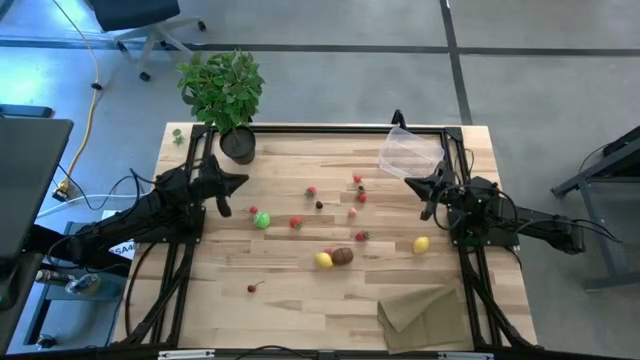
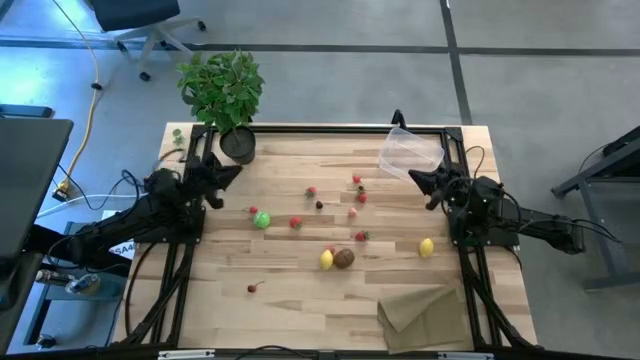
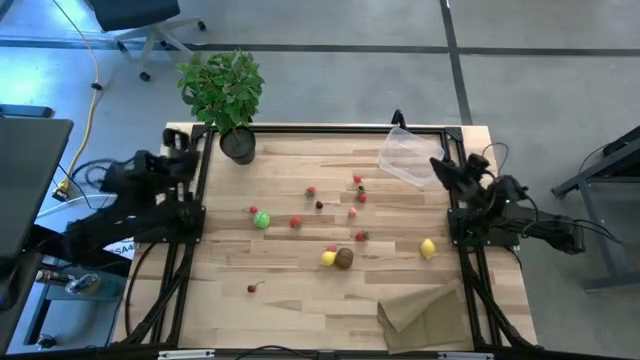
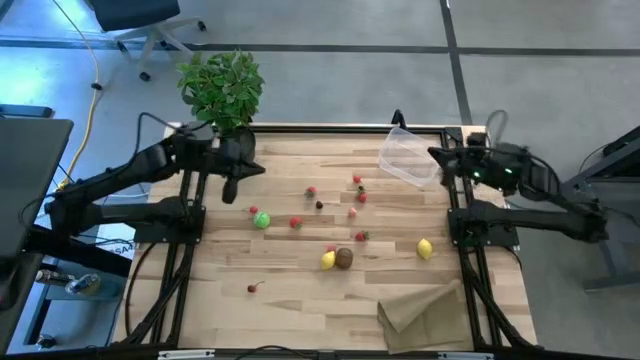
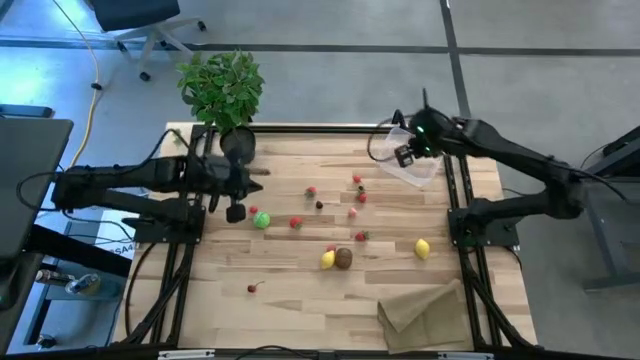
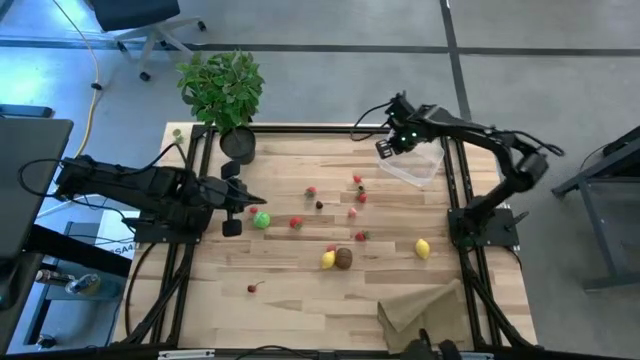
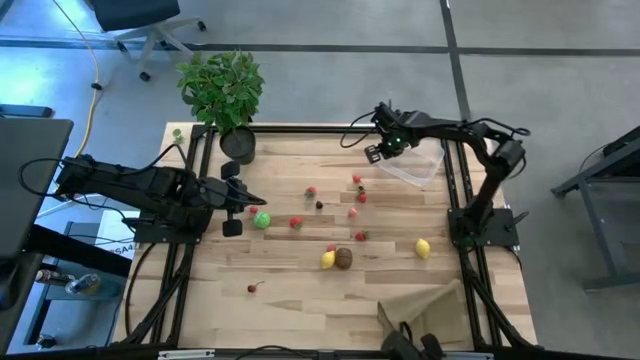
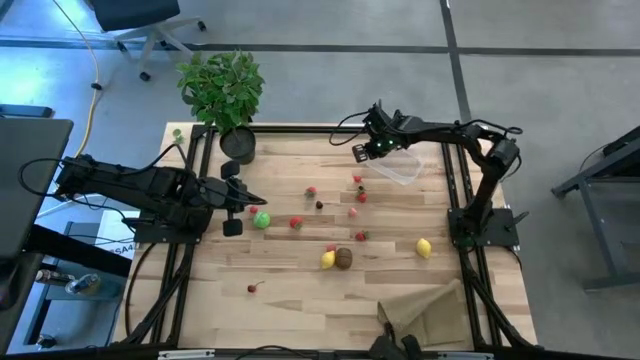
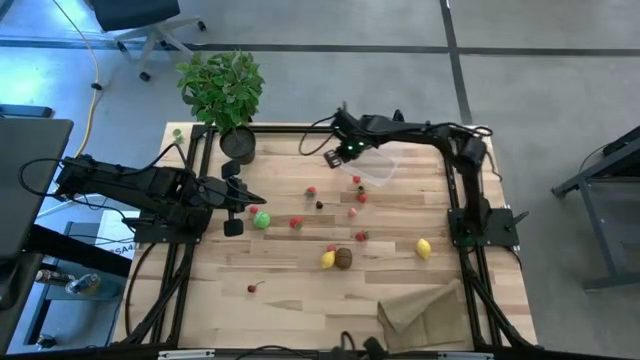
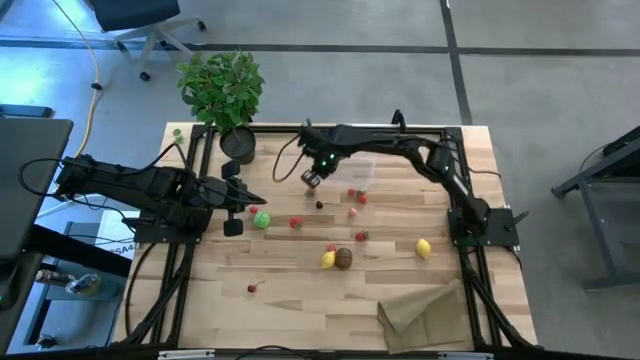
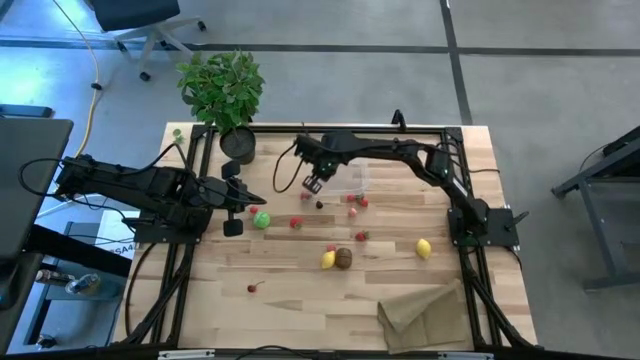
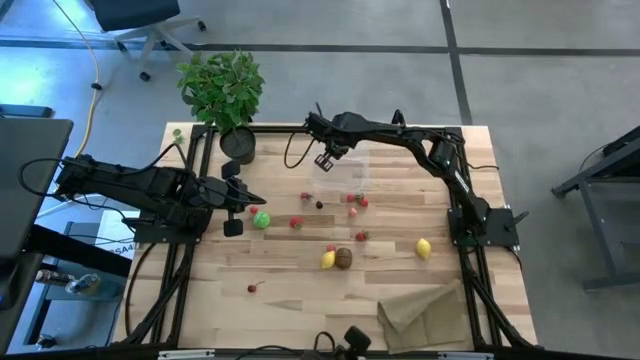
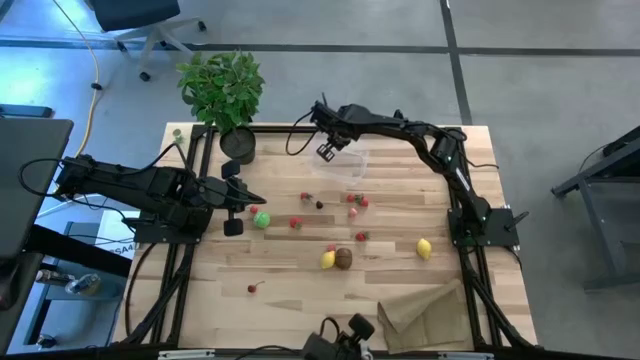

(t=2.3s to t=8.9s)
Task: Pick and placing Produce into tupperware
Move the transparent bin

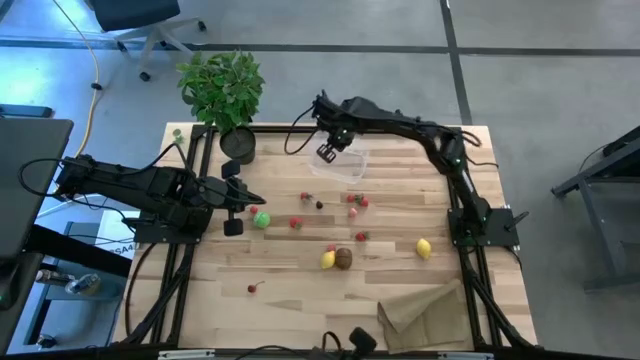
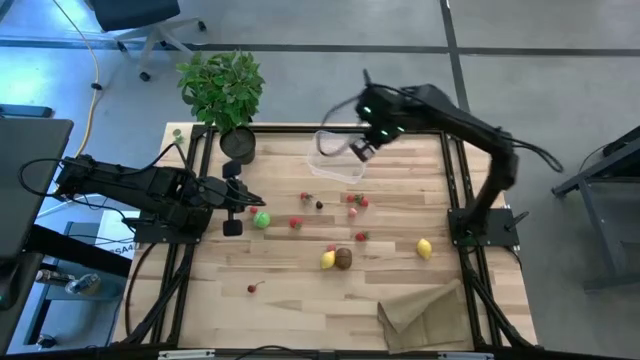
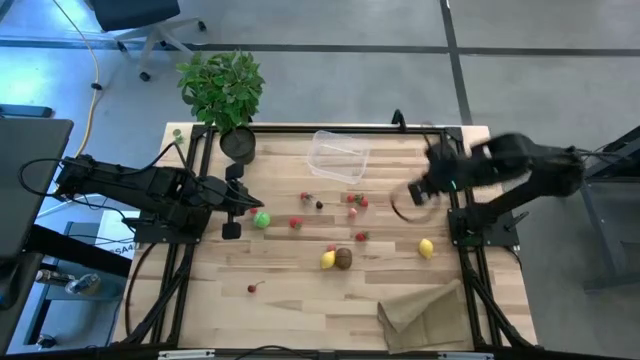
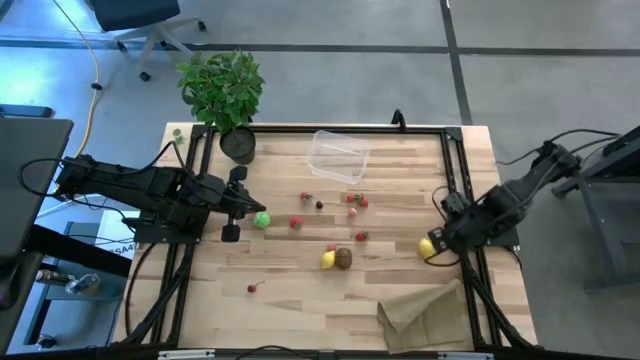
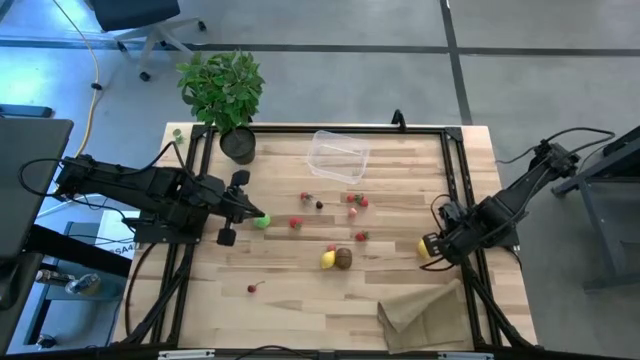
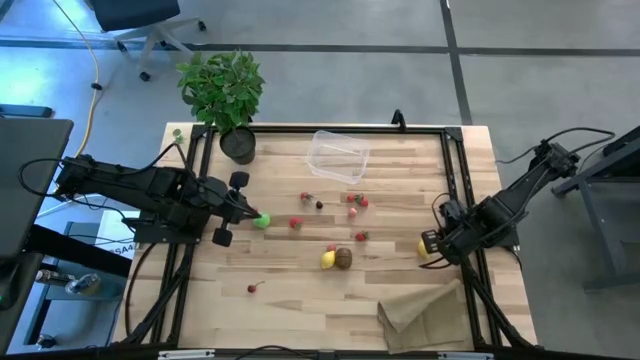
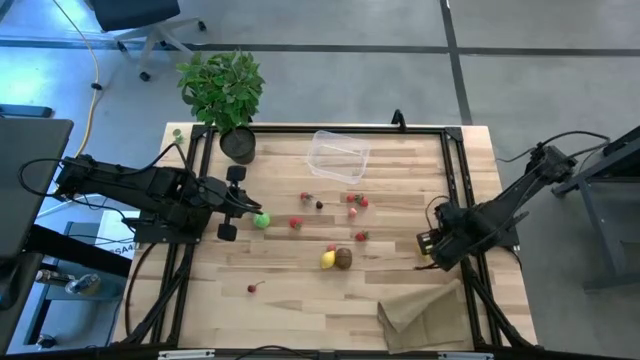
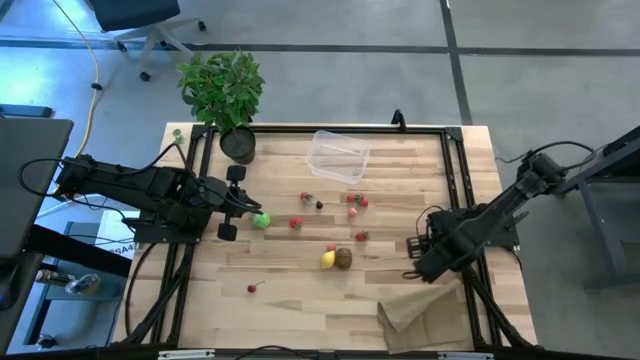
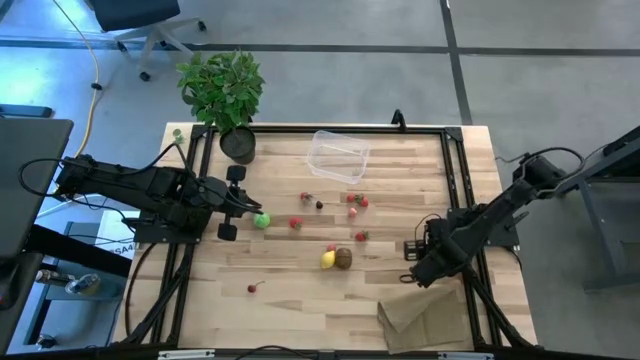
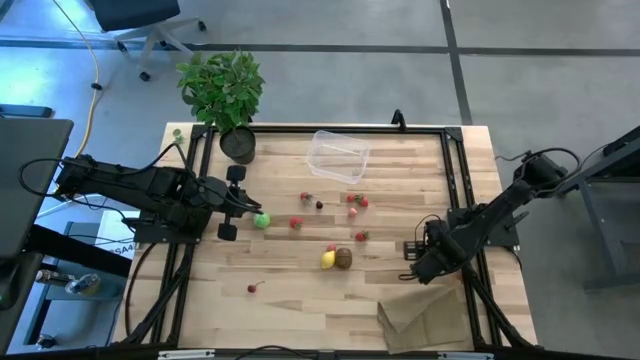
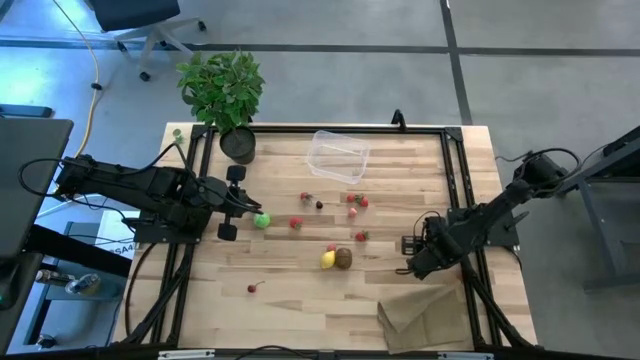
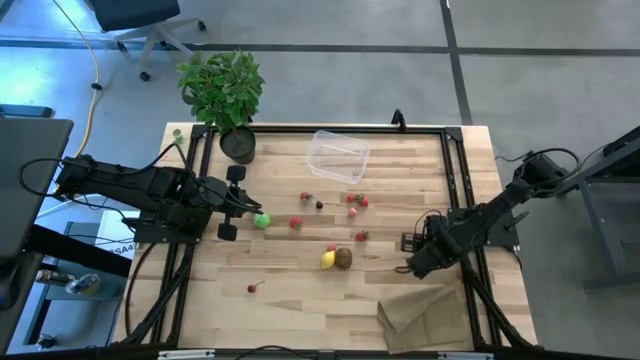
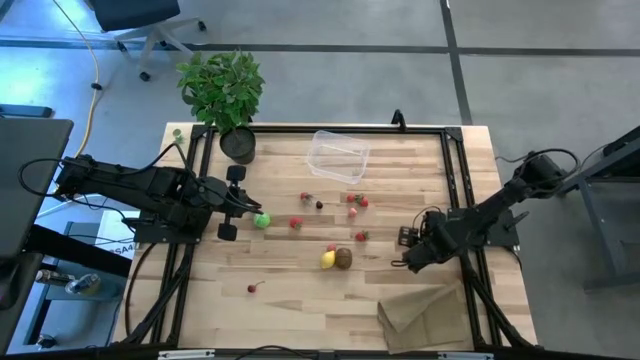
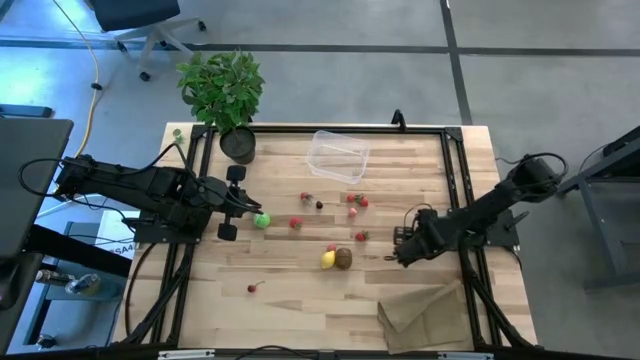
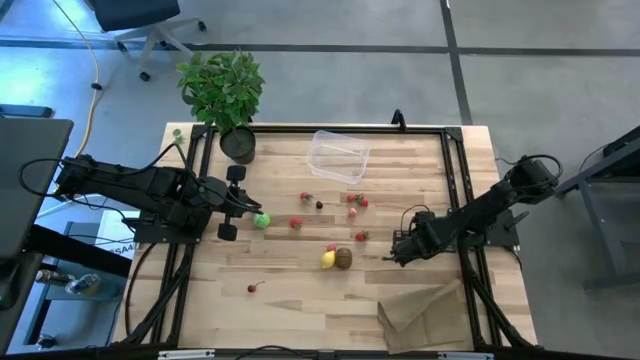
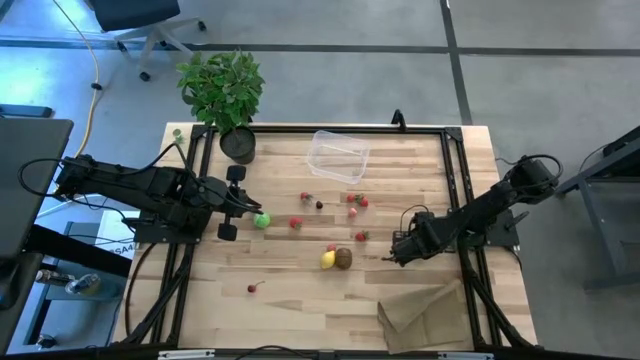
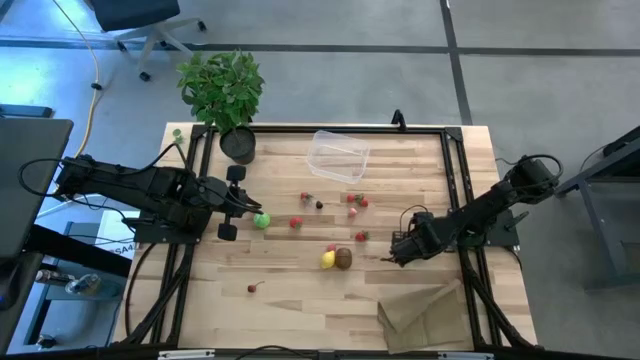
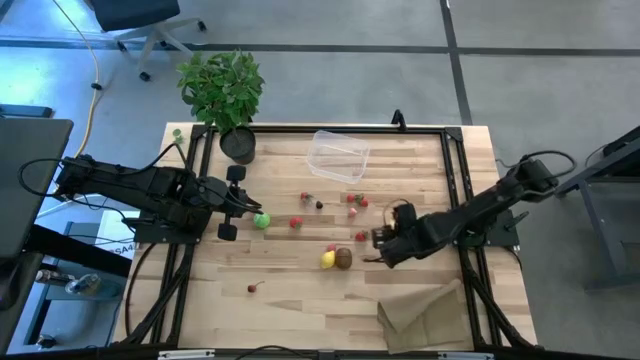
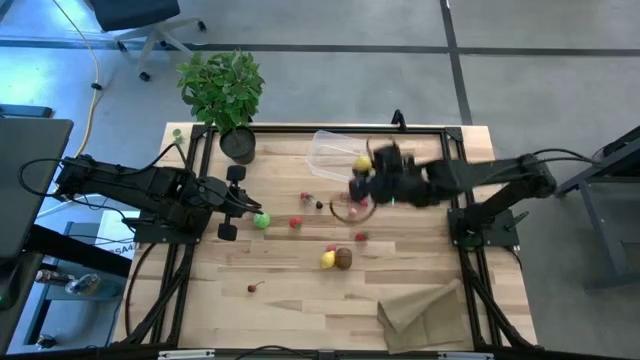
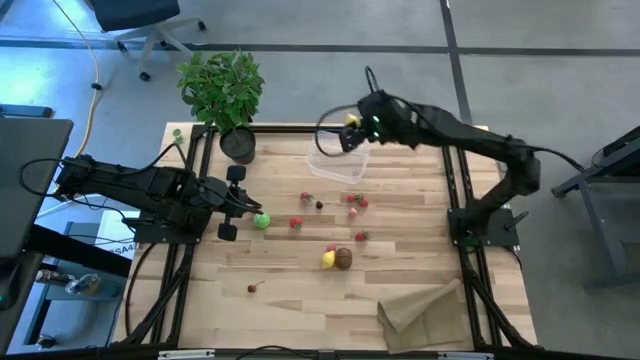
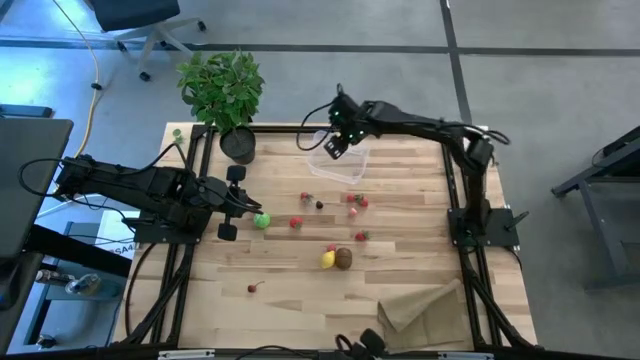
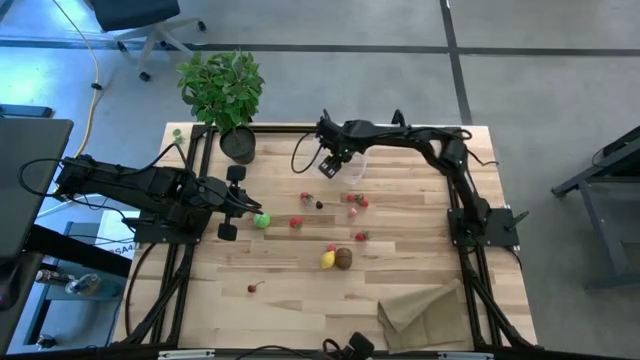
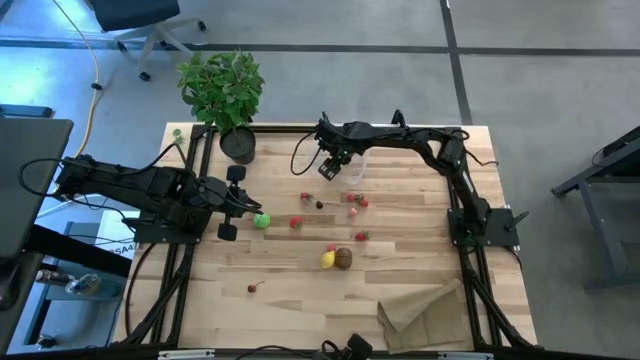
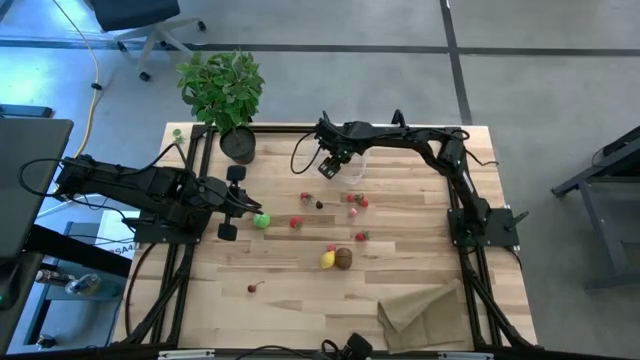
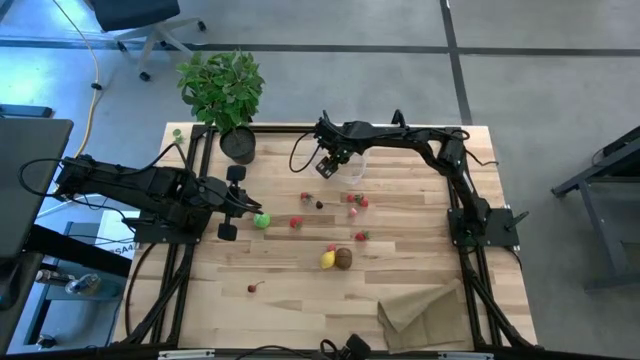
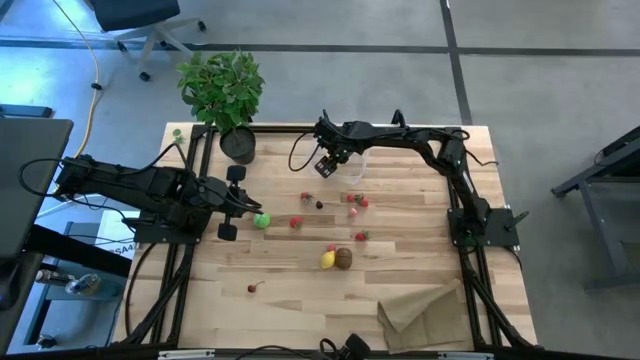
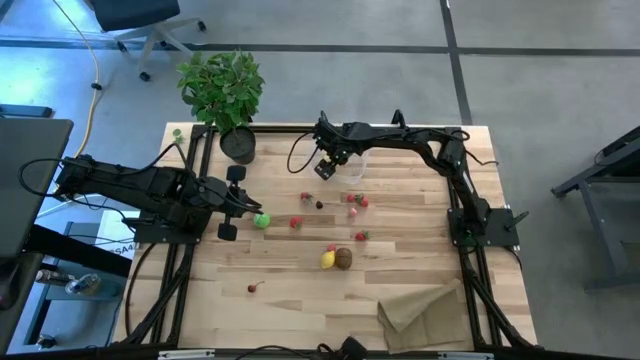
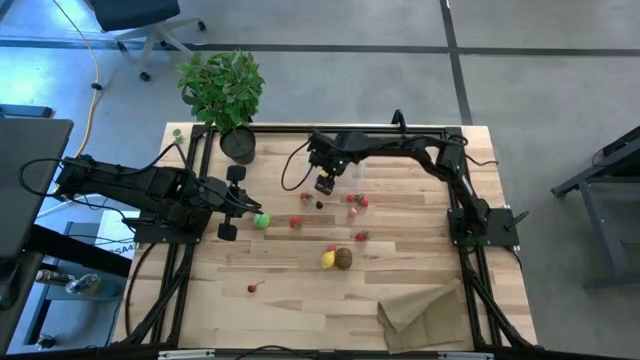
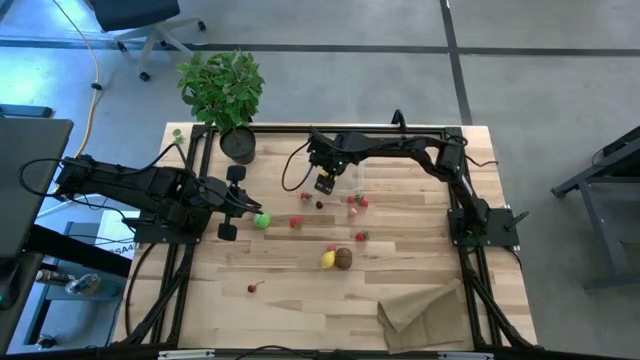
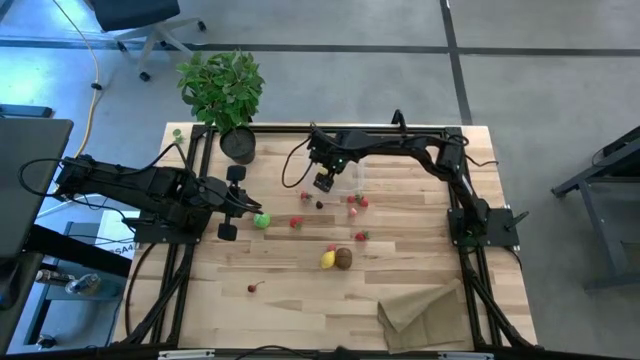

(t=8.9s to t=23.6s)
Put the right lemon into the transparent bin
